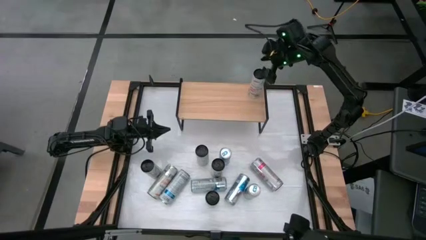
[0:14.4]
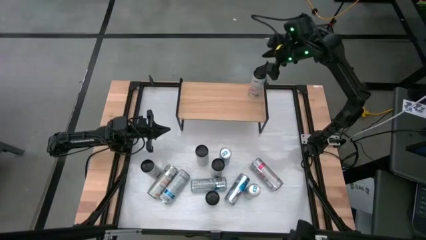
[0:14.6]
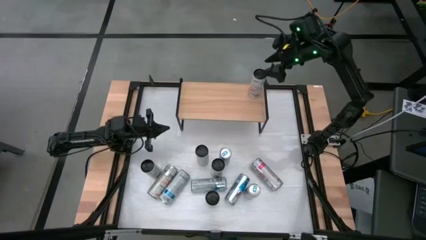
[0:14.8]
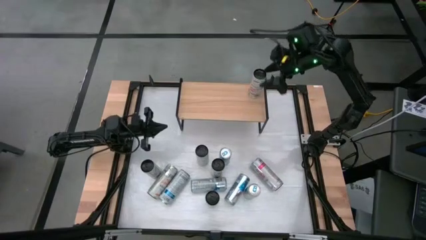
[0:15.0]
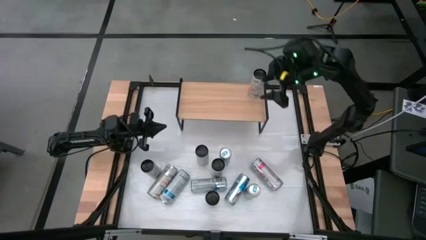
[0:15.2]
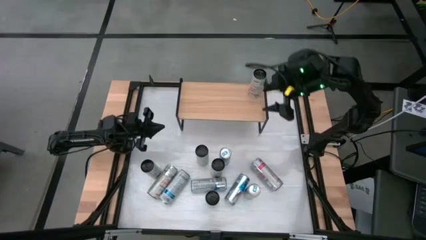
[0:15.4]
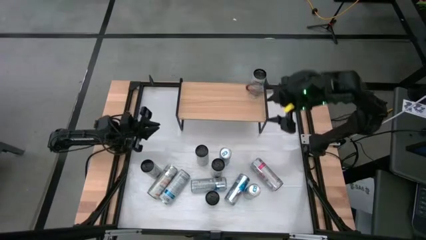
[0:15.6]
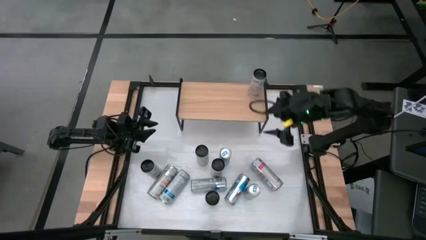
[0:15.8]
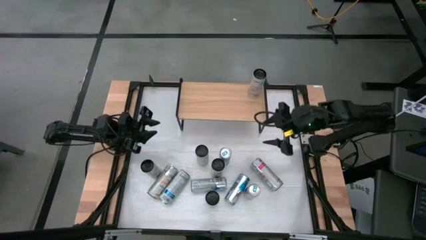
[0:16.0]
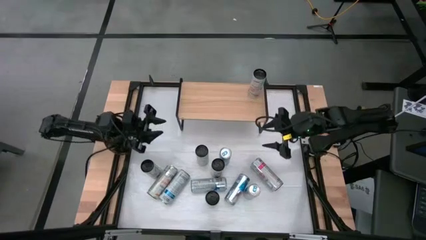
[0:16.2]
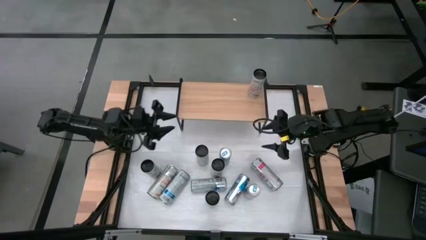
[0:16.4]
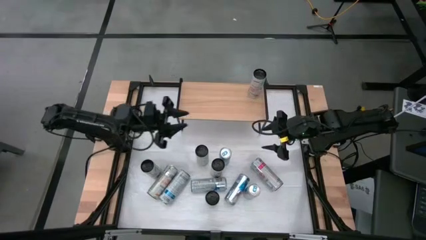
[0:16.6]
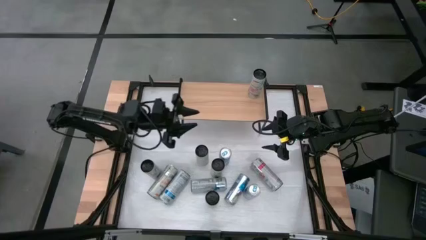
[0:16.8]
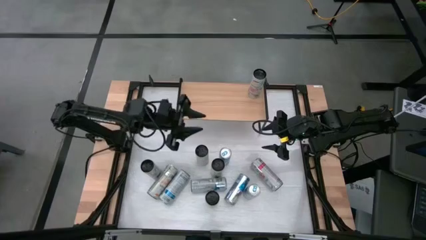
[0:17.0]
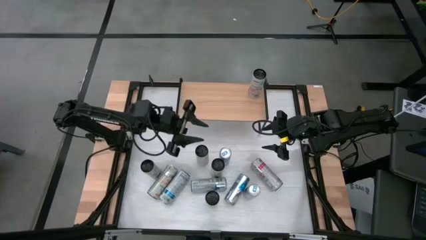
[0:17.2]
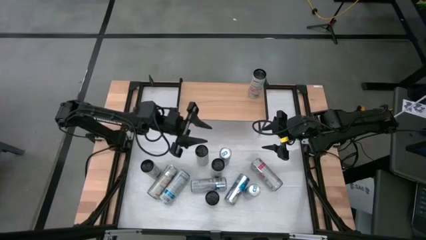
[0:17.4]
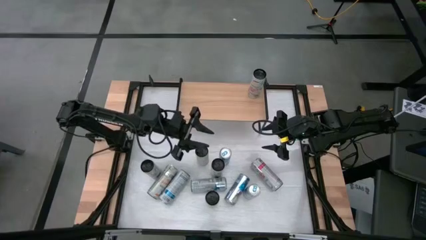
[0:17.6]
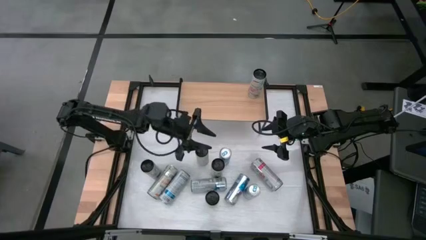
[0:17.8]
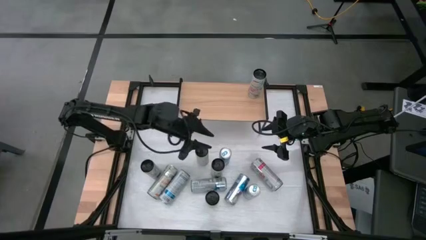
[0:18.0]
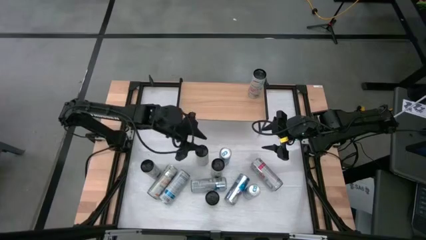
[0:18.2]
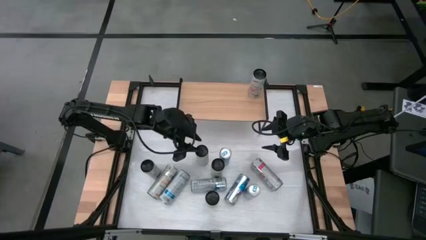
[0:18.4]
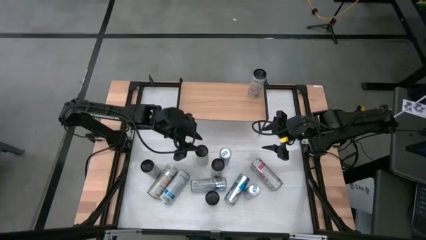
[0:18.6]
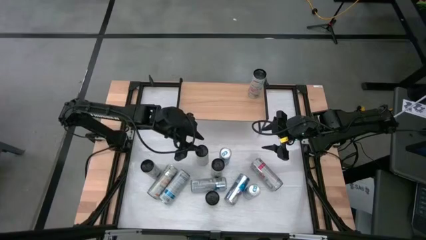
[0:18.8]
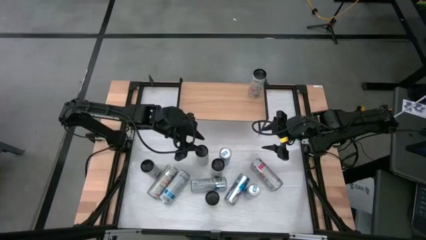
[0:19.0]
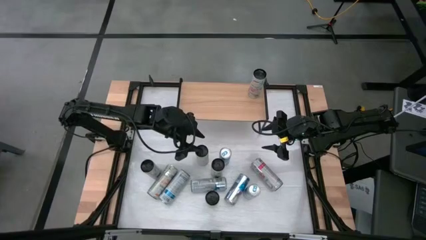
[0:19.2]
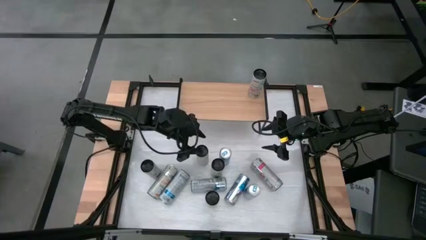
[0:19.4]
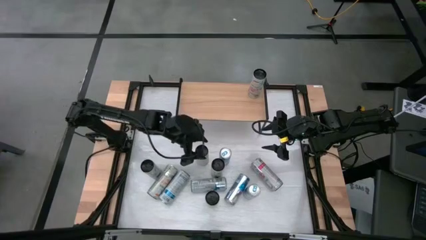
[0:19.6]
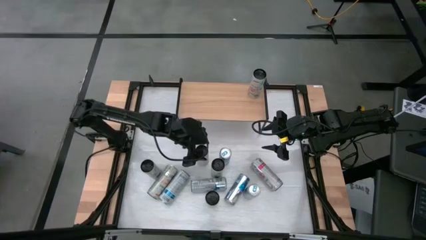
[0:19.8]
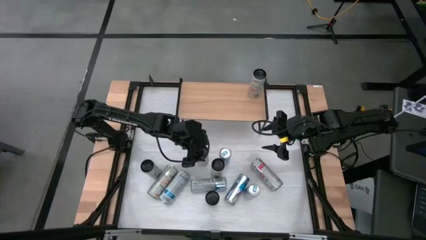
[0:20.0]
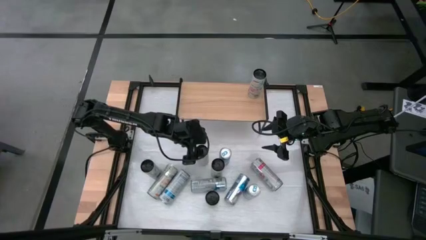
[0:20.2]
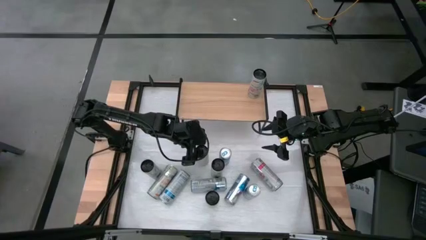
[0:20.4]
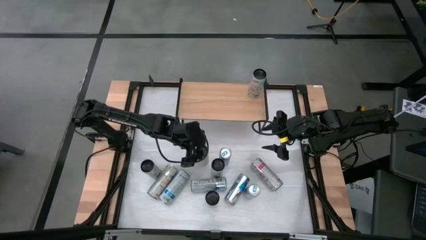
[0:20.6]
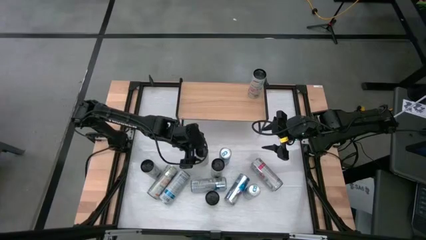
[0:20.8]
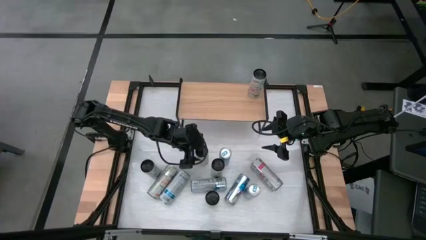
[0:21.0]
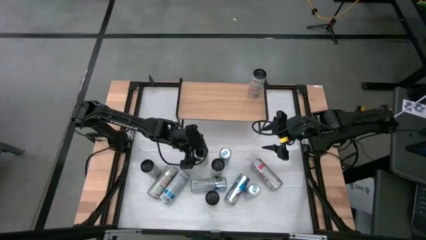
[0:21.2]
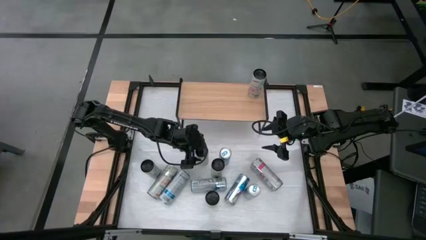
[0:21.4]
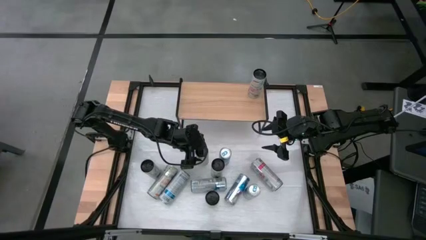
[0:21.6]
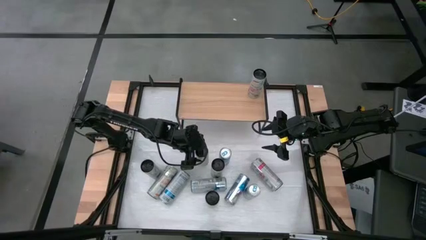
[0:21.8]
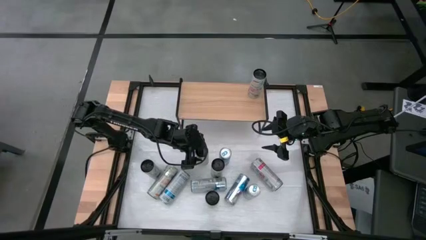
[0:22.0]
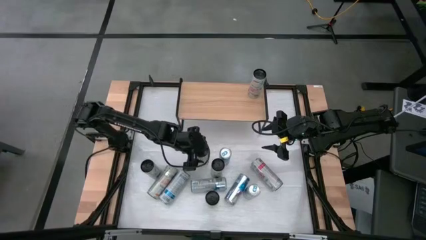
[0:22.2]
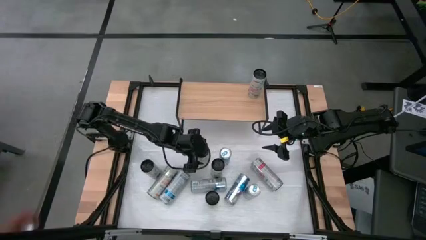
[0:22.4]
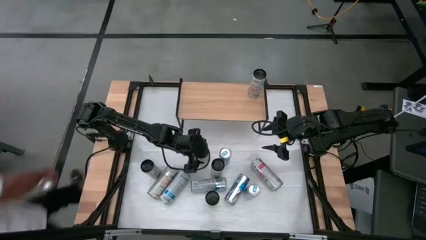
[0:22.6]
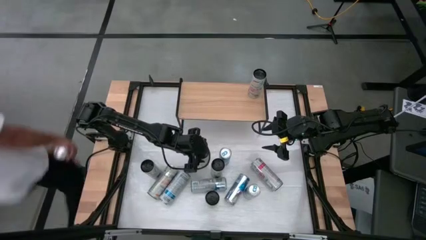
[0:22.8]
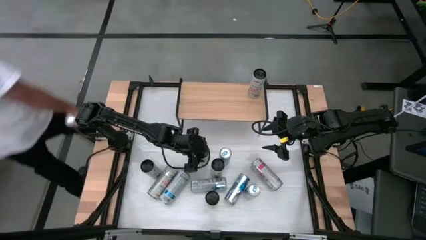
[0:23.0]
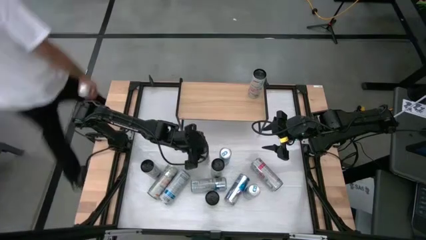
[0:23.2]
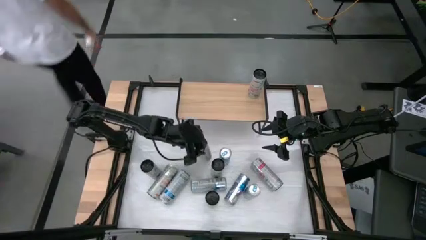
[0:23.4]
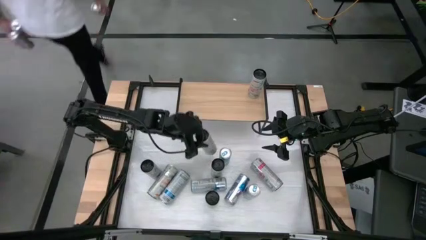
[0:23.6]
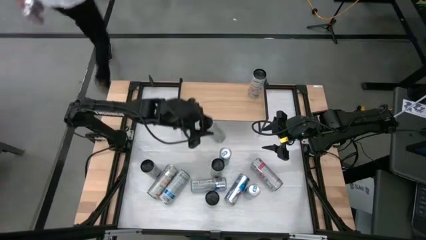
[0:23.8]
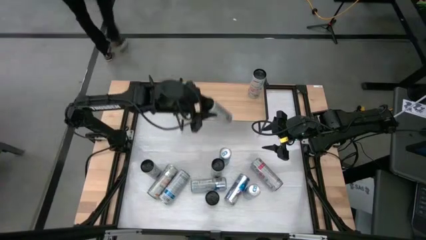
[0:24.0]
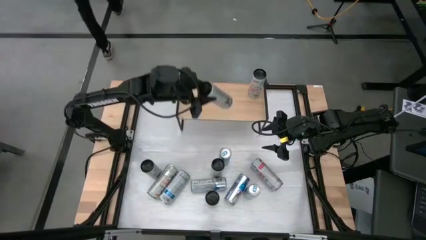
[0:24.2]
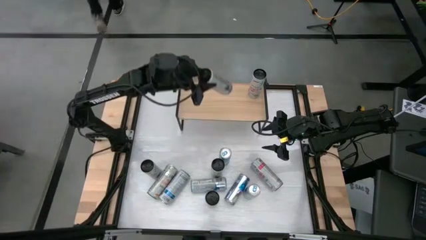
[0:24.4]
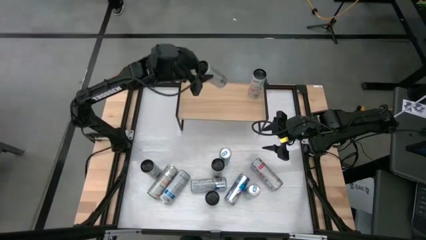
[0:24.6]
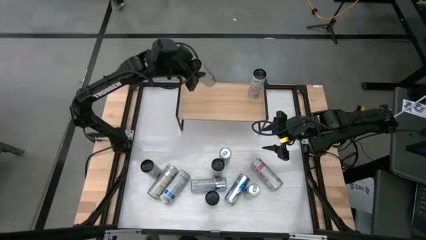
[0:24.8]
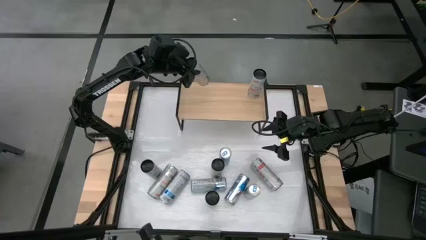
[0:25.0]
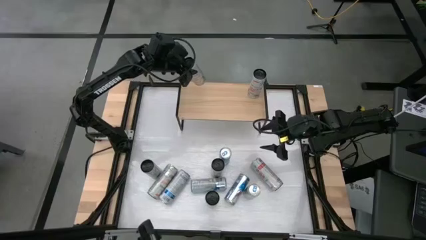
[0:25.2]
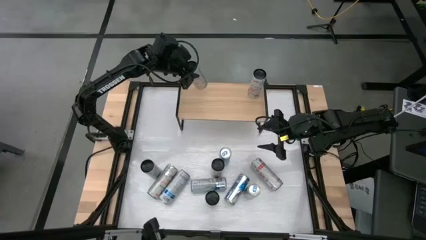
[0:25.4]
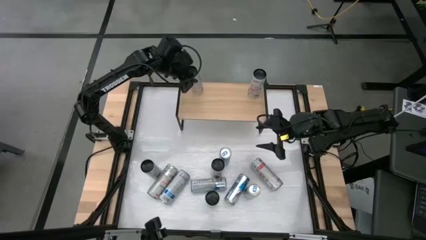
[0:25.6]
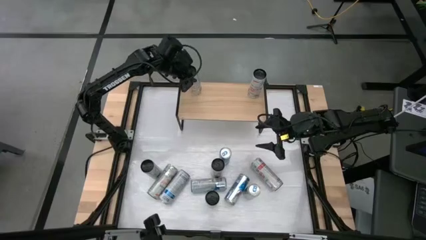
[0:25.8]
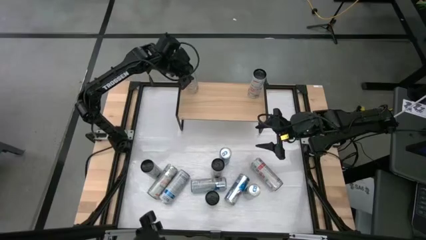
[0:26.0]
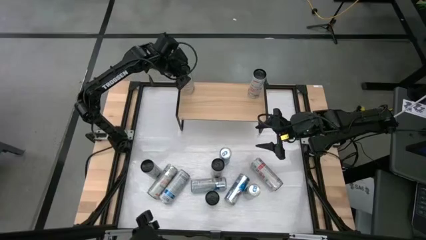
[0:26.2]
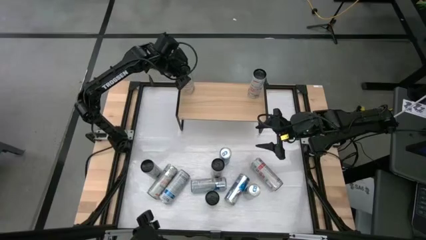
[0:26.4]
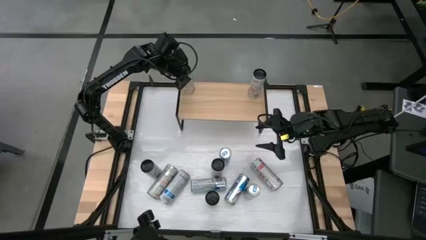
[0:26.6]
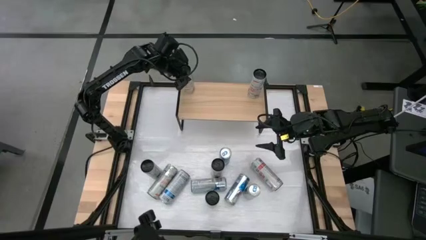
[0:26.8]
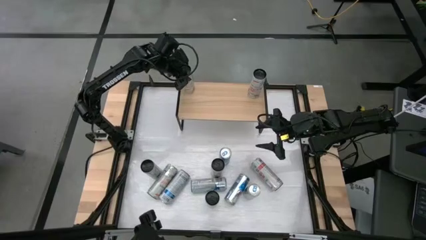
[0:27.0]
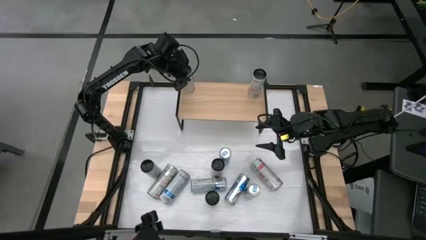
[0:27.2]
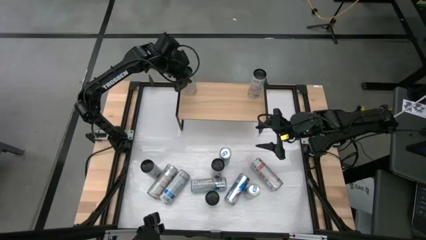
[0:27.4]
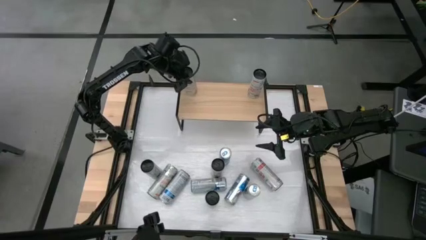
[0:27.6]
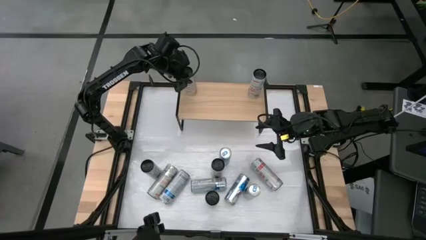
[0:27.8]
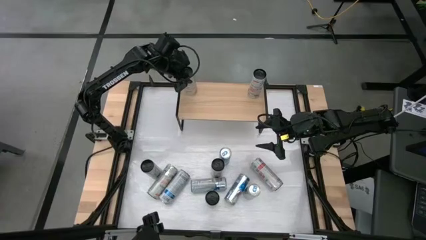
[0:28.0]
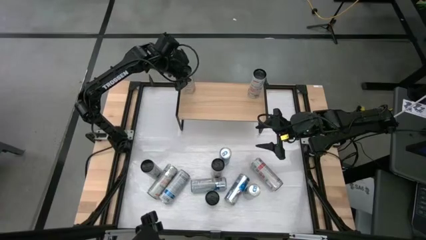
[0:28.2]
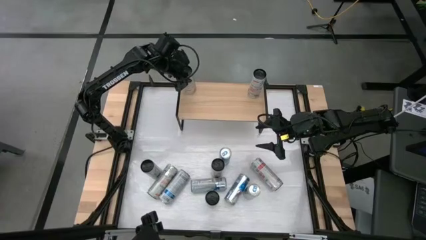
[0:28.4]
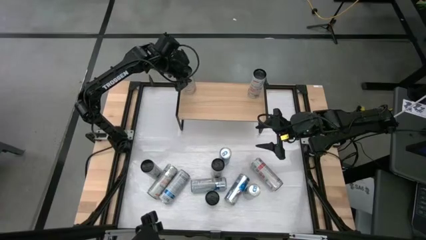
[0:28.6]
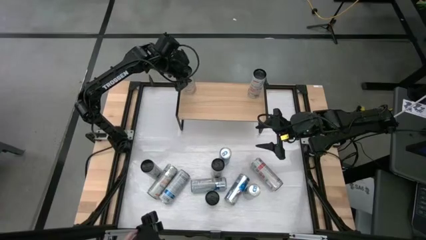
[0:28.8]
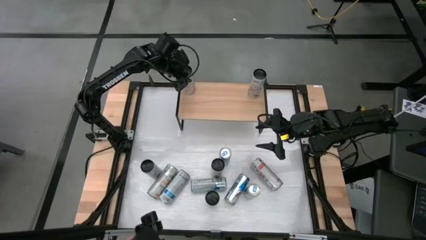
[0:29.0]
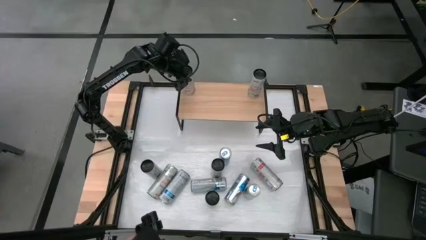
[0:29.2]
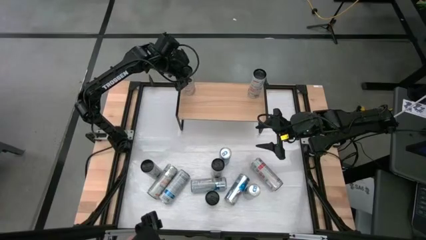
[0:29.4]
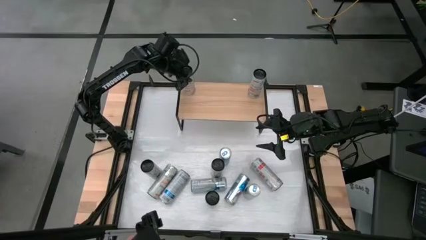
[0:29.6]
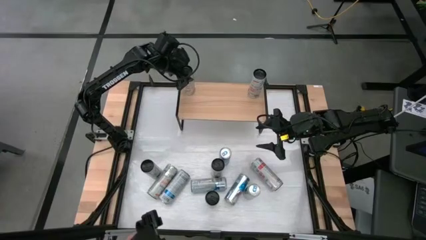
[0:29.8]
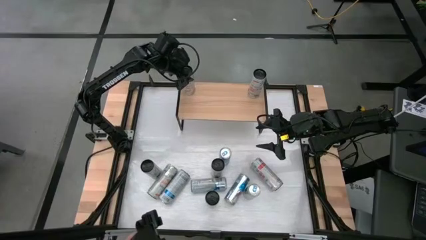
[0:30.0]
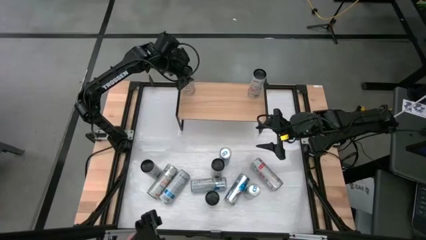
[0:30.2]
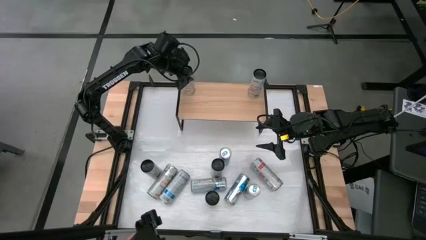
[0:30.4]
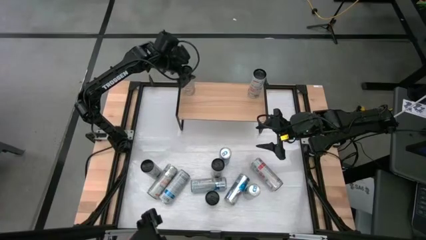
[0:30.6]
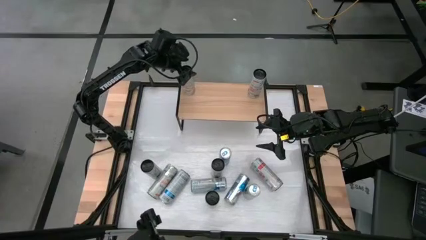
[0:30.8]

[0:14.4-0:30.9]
Task: Sort soda cans
Put the top white yellow soda can on the shelf
